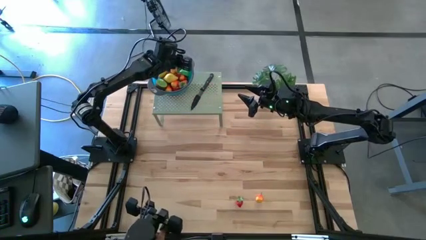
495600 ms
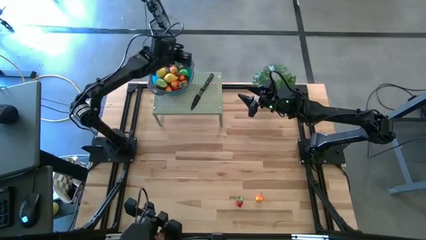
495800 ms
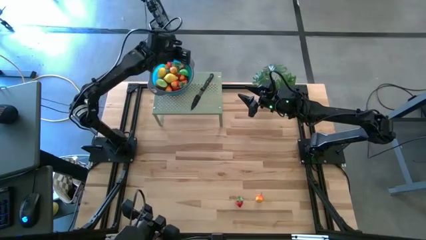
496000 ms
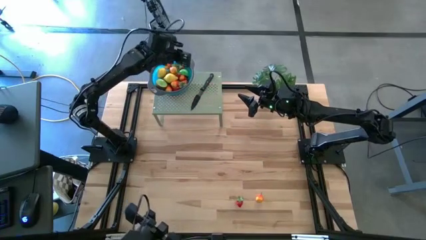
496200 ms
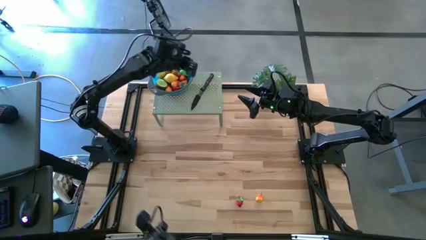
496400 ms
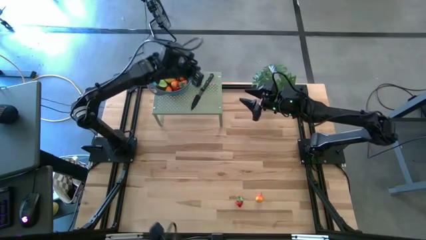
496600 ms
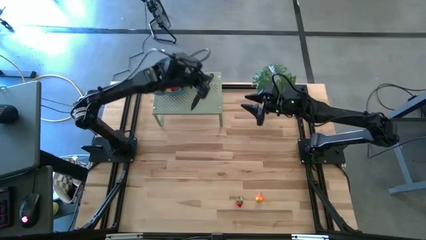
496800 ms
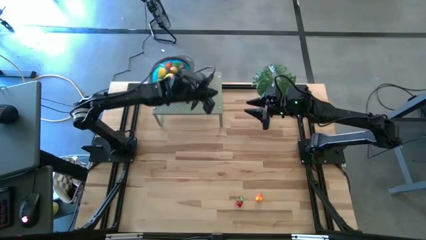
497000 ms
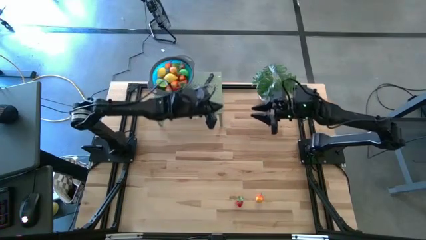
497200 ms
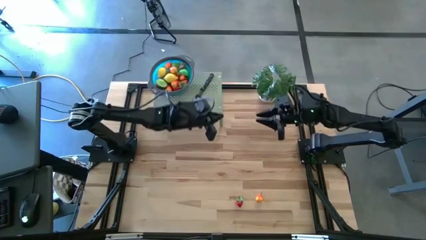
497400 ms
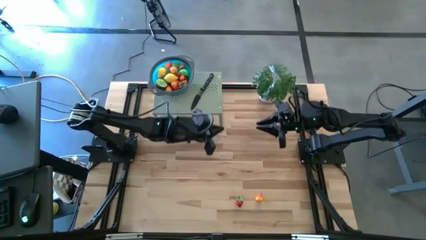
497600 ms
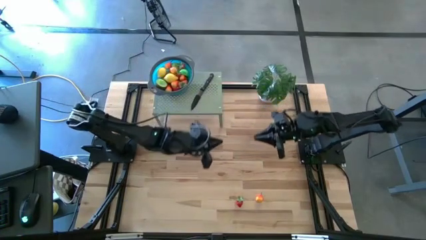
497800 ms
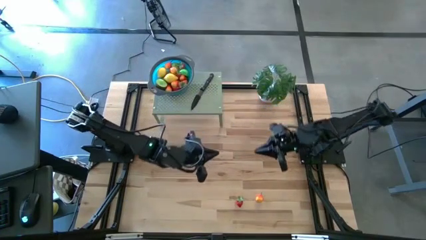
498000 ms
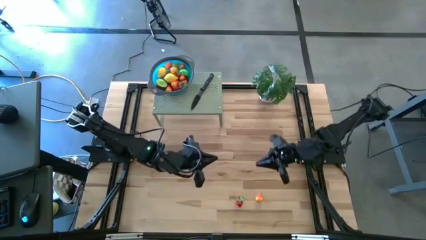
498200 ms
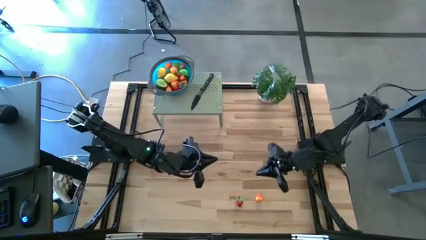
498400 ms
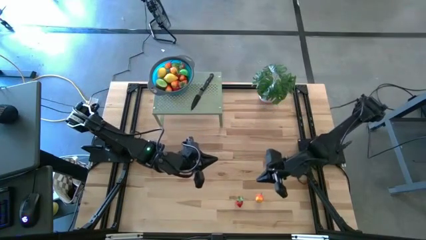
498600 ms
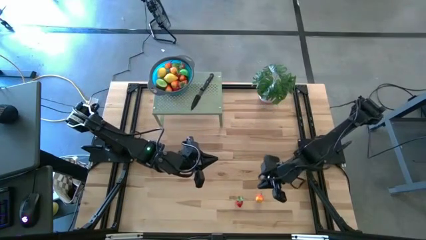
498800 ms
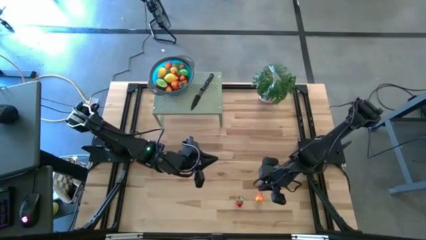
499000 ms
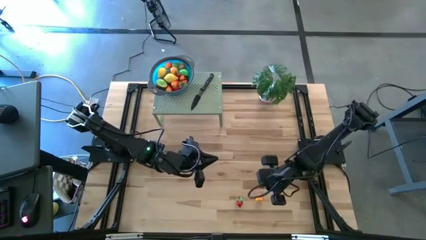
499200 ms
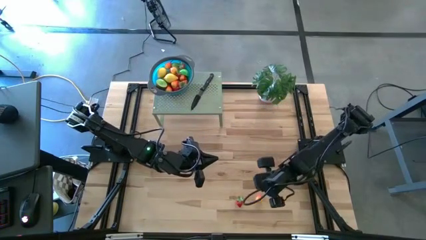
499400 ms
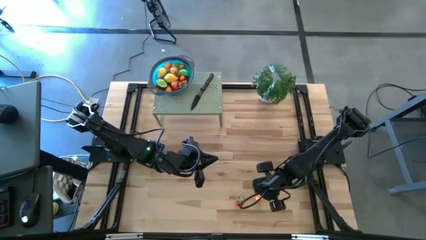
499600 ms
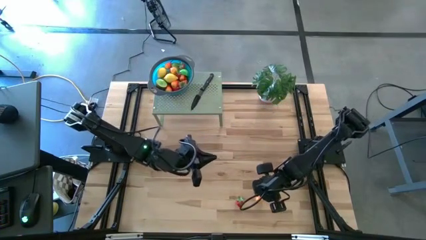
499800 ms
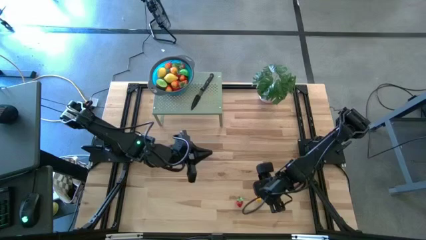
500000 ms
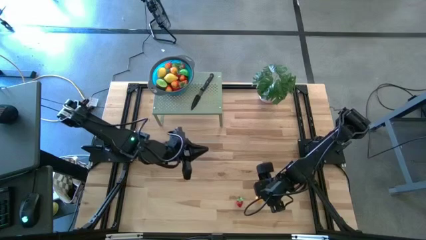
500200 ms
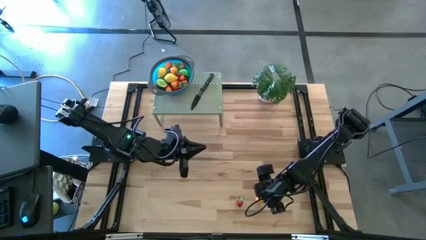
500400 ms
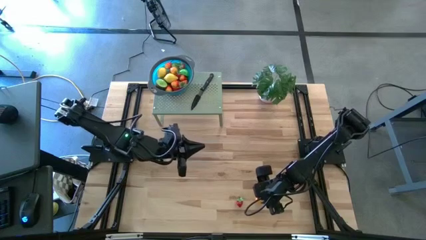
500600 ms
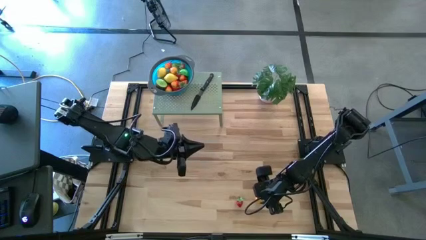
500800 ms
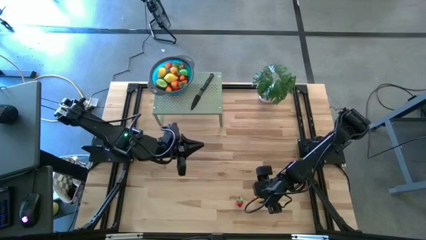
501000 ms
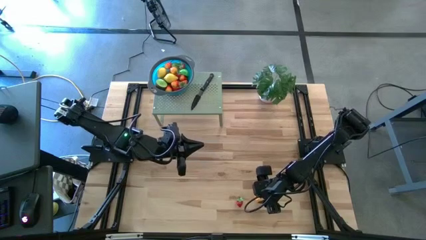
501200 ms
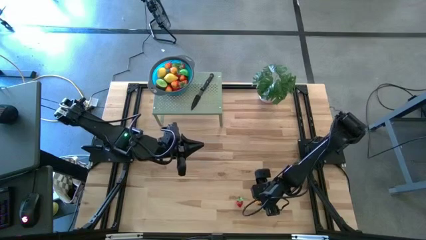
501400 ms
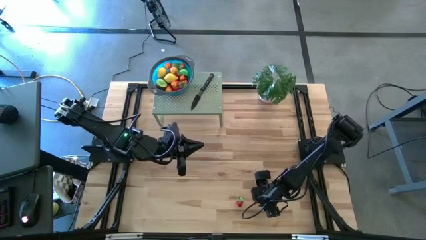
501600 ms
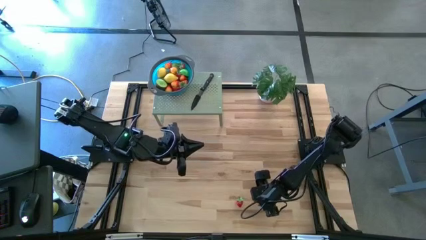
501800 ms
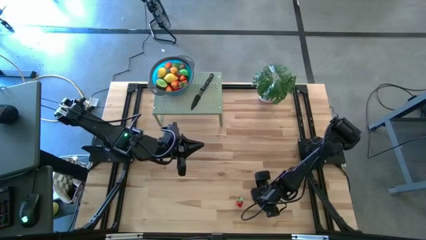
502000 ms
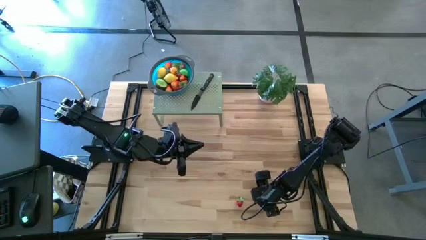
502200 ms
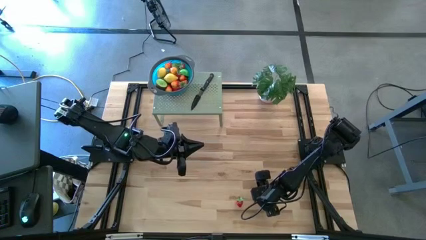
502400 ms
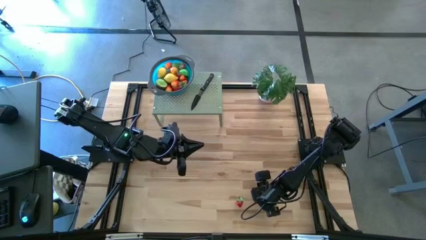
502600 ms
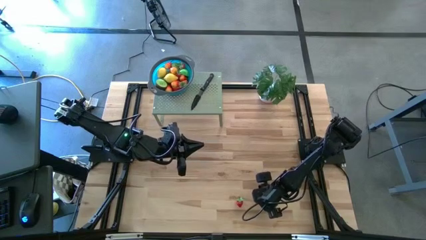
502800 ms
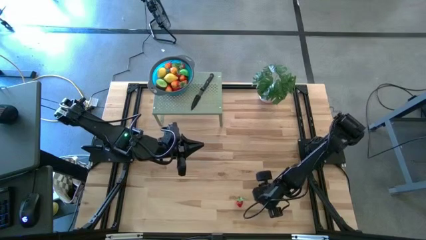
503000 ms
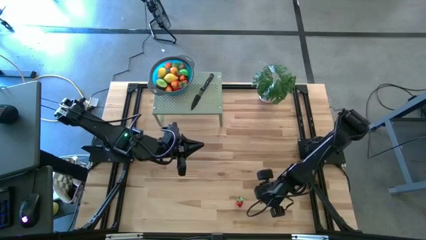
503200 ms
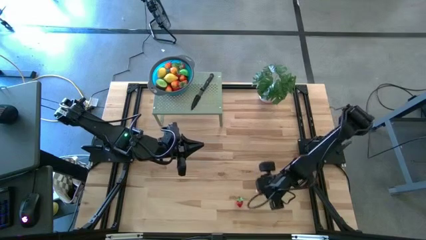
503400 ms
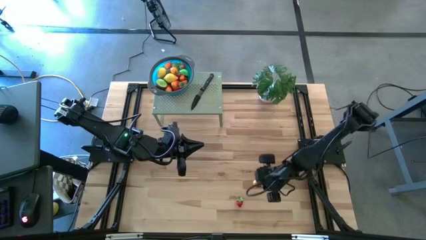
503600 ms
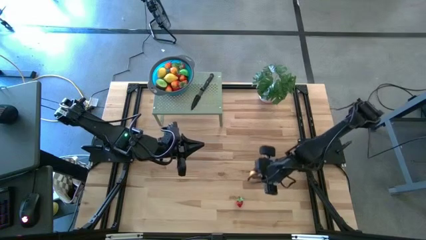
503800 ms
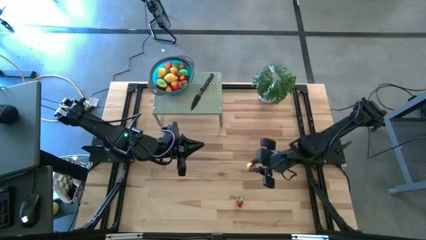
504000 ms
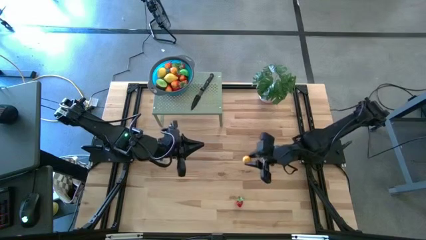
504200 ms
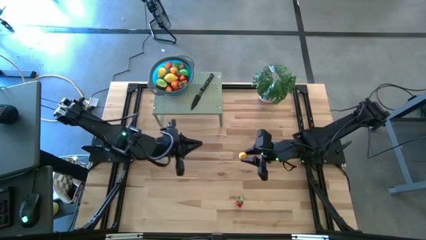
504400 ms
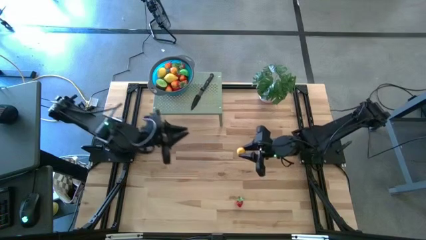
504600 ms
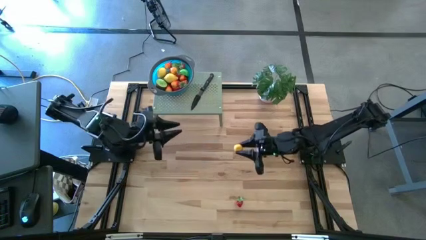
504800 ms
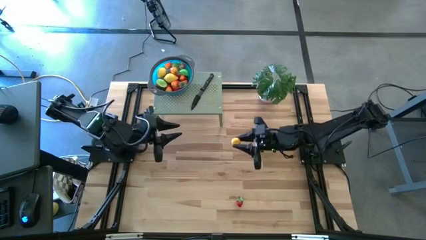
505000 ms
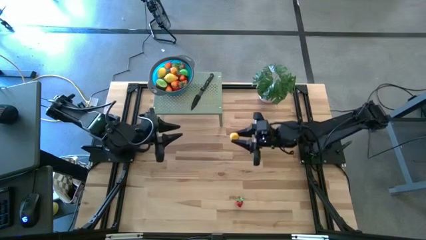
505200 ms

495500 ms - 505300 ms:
Task: Pick & Place Fruit
Put the orange pear into the strainer bowl on the shelf

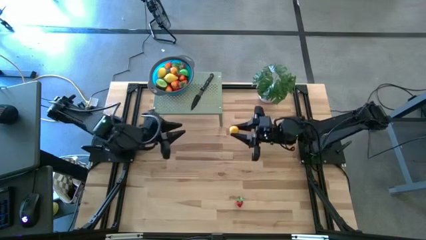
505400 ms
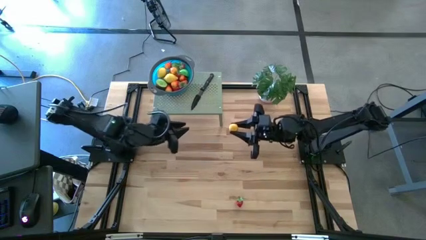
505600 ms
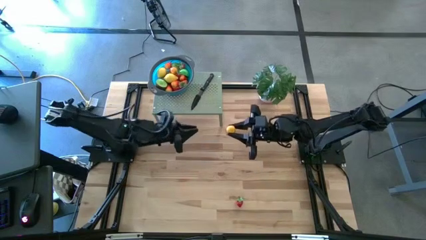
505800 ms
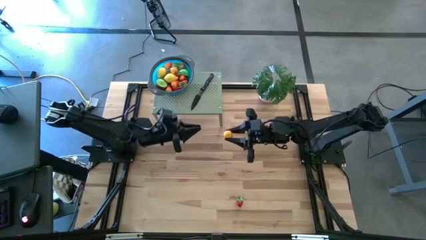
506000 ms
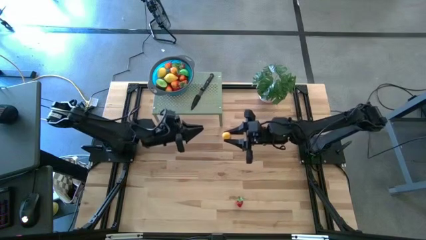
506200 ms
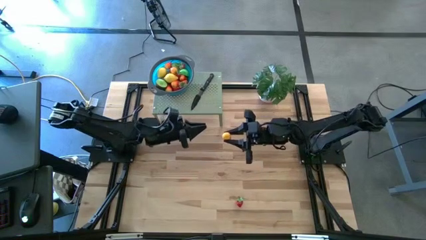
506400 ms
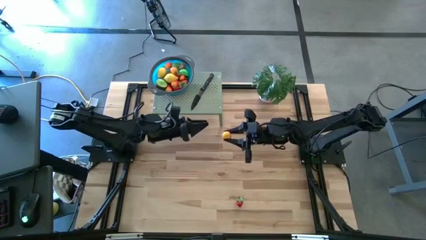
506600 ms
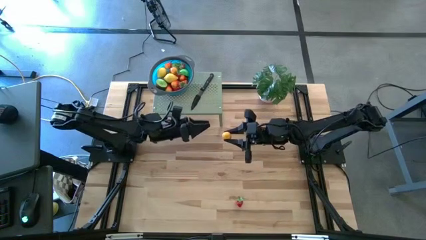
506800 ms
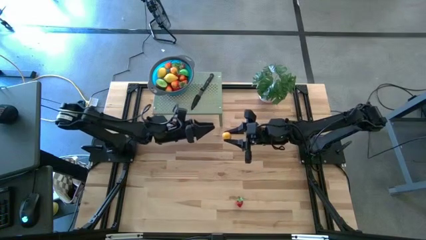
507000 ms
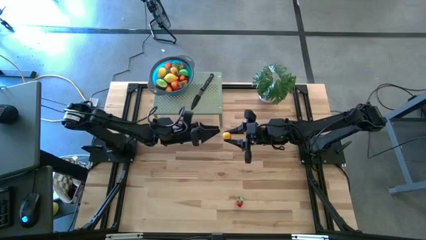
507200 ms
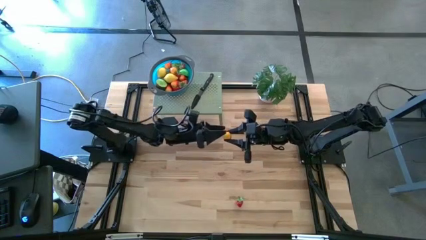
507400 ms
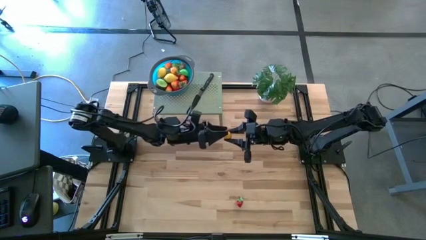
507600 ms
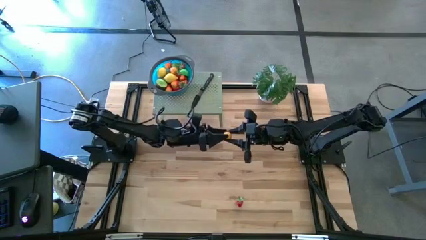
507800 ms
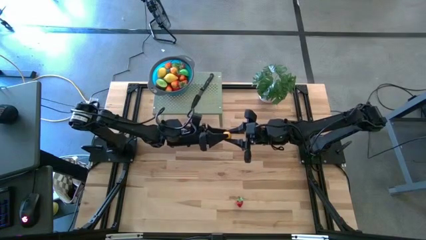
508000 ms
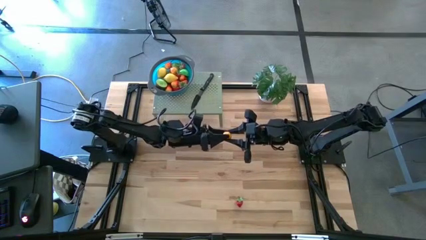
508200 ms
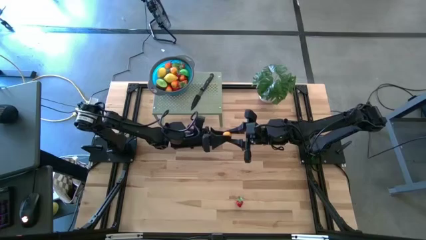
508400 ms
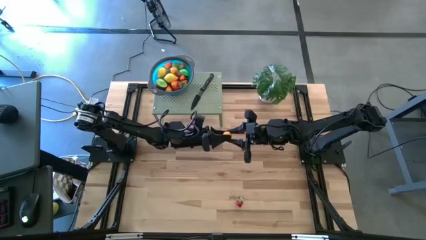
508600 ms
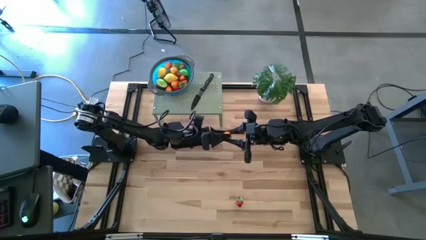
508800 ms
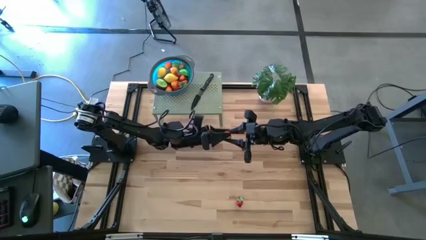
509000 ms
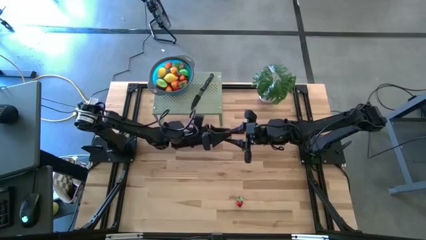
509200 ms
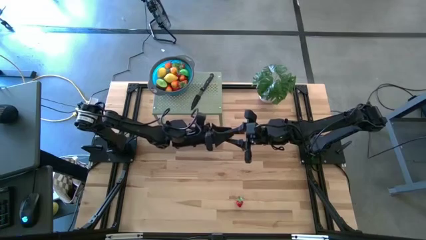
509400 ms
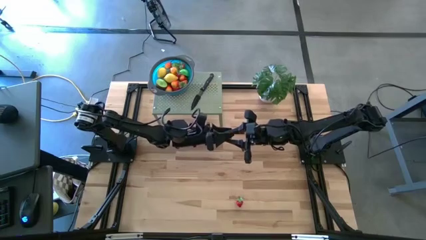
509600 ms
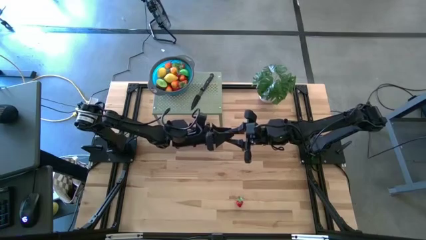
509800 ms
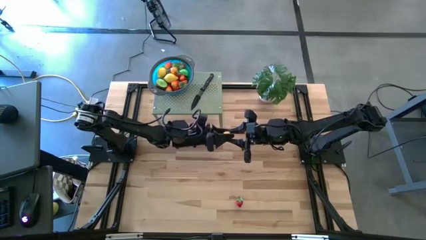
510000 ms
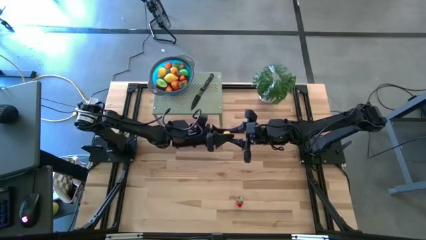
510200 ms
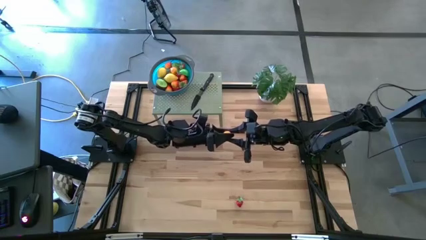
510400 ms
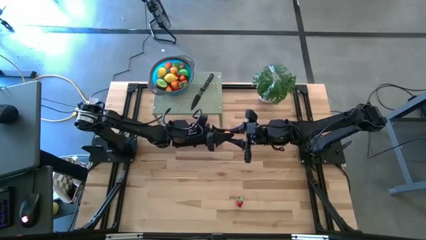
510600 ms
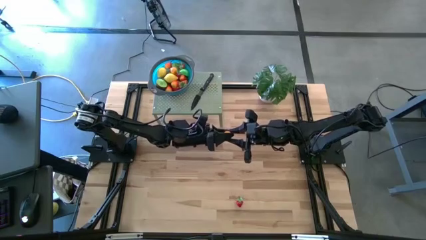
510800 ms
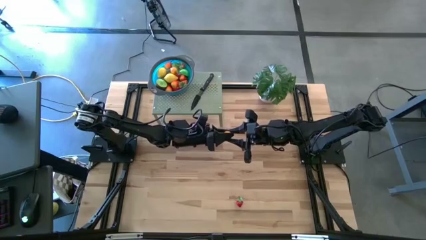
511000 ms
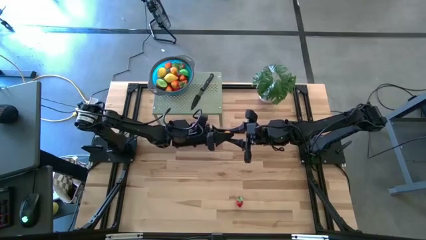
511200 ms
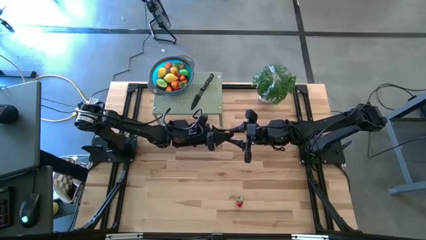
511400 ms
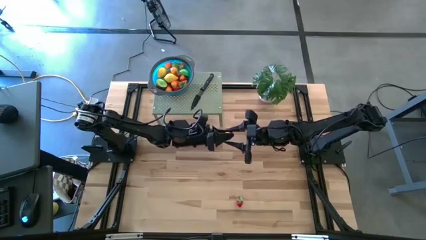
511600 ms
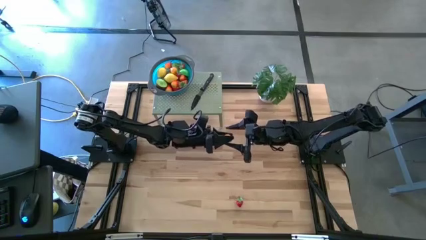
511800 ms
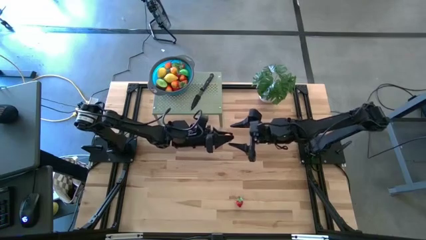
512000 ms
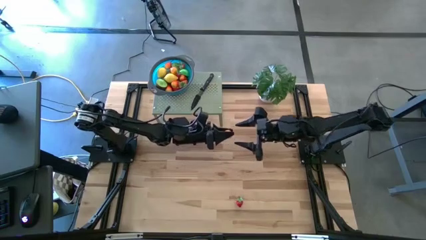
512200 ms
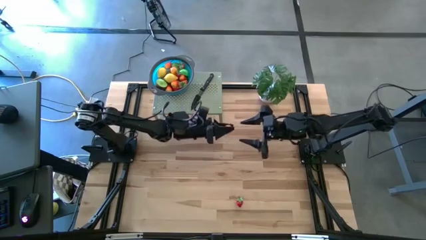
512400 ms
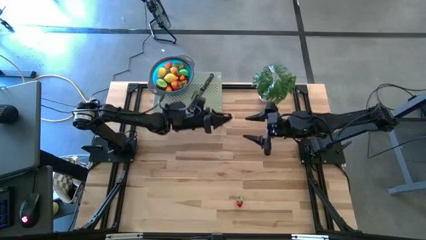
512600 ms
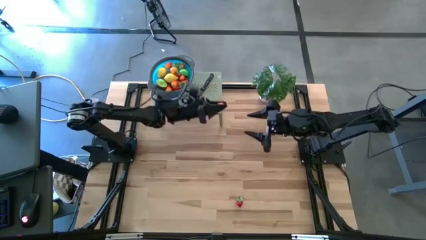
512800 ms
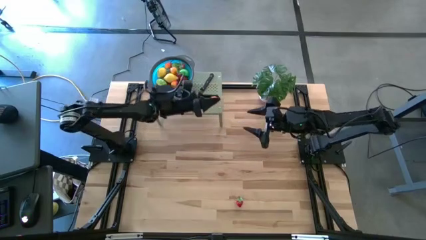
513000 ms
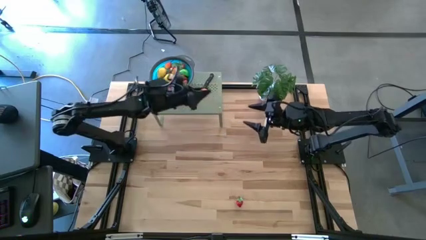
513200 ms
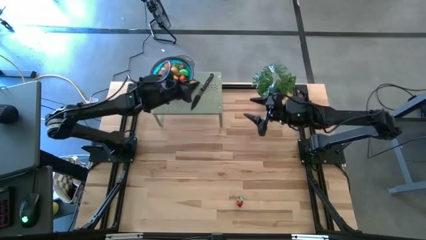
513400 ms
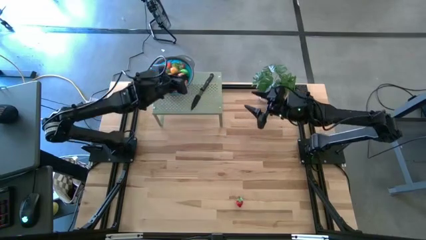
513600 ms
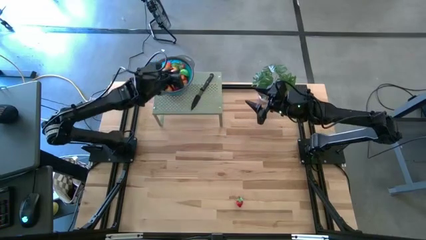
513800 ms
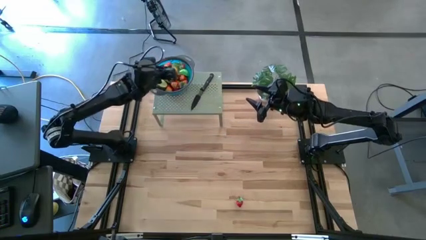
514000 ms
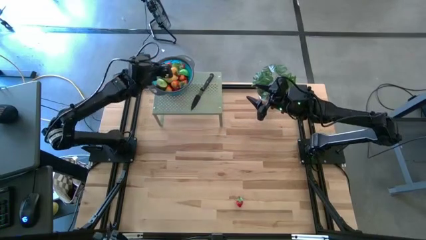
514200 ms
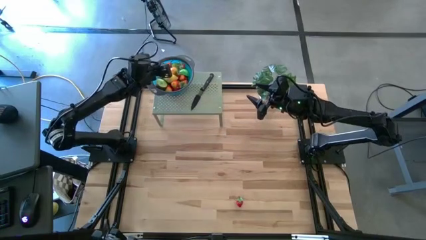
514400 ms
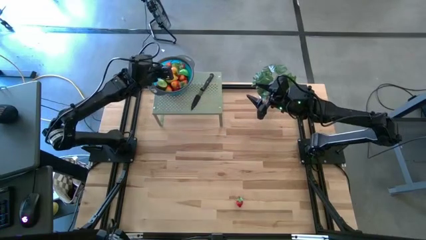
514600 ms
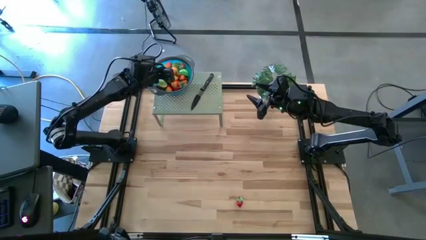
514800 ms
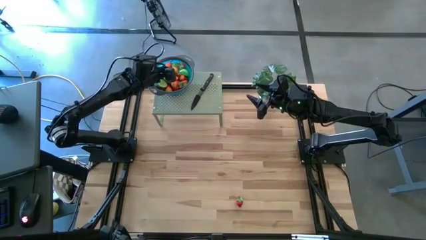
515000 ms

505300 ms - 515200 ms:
Put the orange pear into the strainer bowl on the shelf
